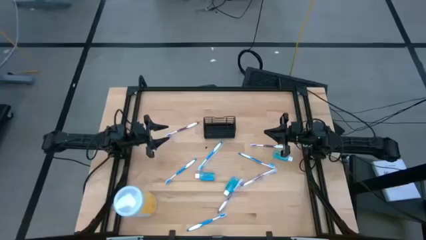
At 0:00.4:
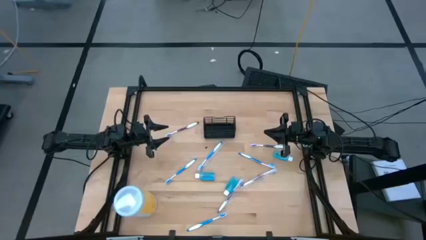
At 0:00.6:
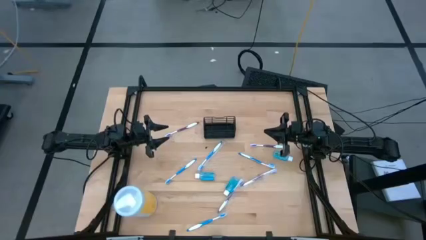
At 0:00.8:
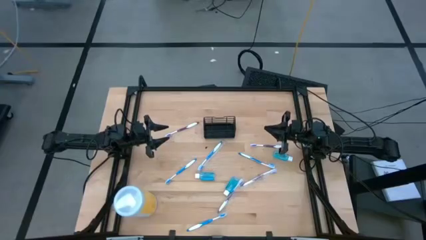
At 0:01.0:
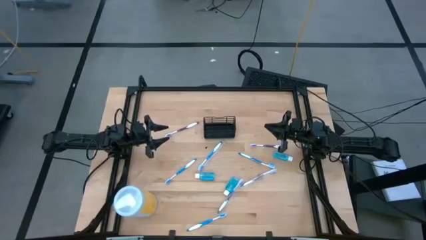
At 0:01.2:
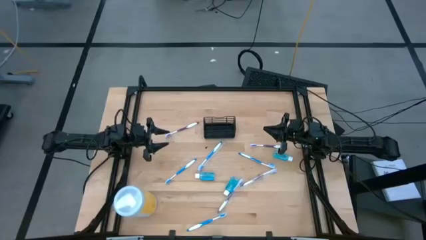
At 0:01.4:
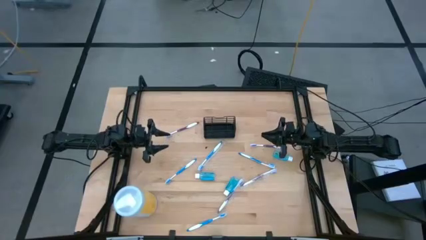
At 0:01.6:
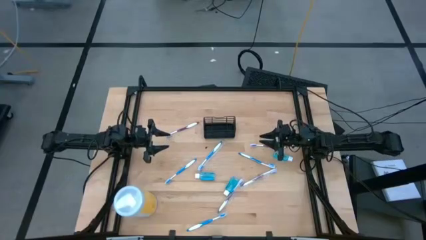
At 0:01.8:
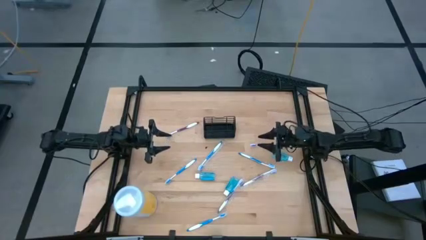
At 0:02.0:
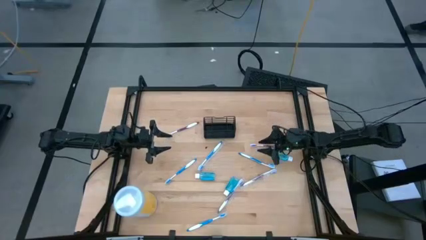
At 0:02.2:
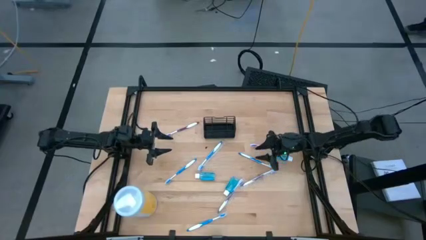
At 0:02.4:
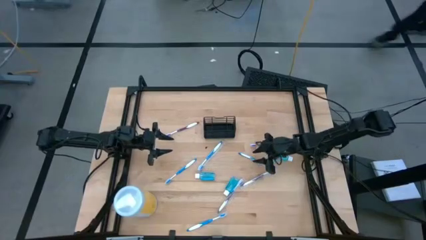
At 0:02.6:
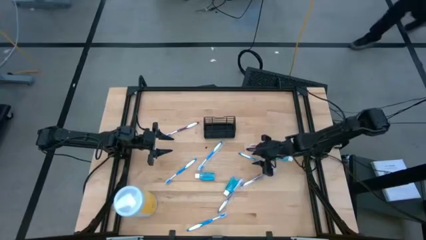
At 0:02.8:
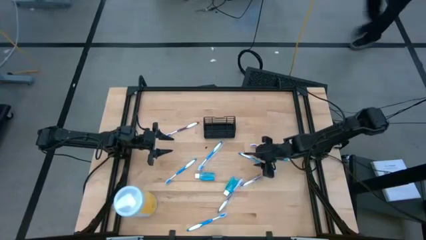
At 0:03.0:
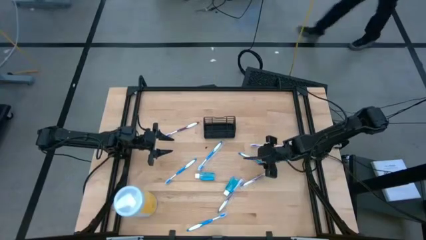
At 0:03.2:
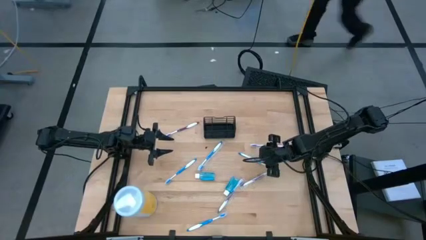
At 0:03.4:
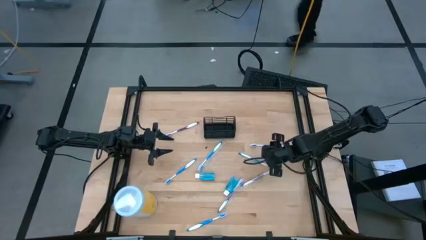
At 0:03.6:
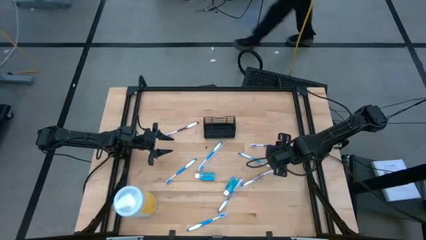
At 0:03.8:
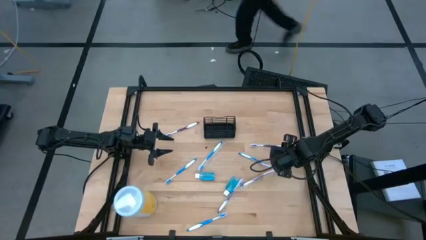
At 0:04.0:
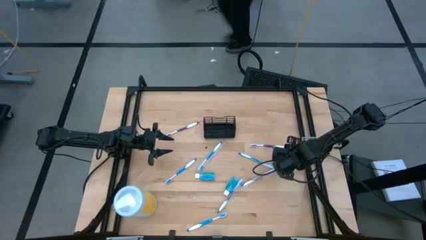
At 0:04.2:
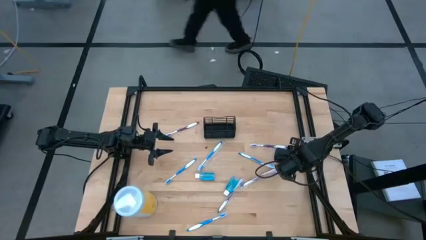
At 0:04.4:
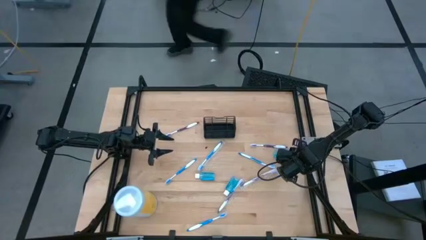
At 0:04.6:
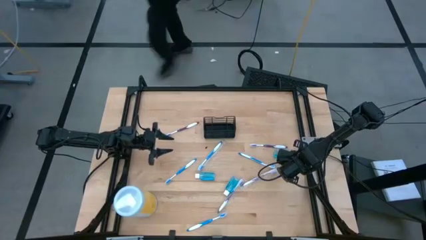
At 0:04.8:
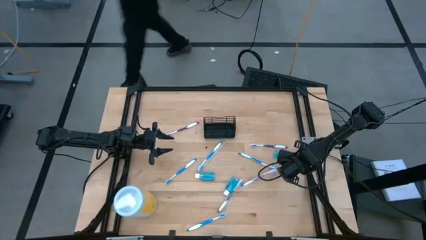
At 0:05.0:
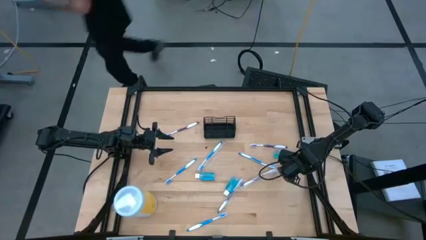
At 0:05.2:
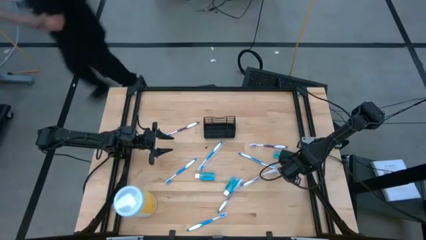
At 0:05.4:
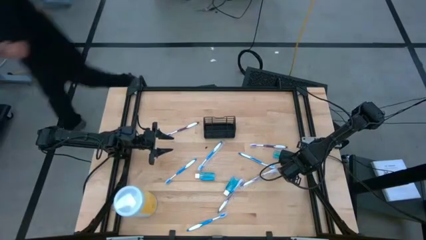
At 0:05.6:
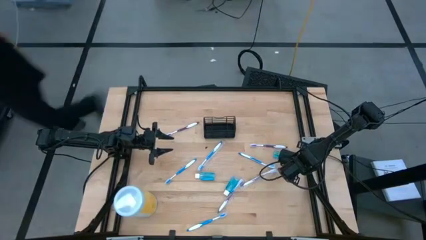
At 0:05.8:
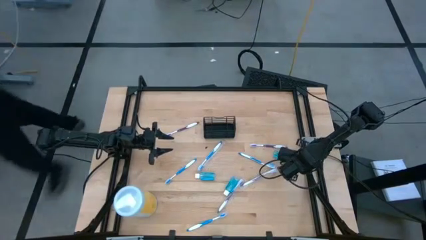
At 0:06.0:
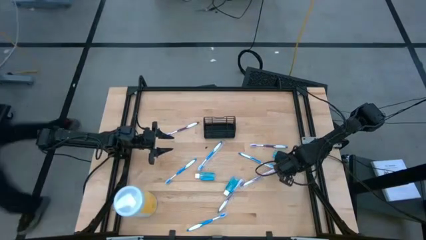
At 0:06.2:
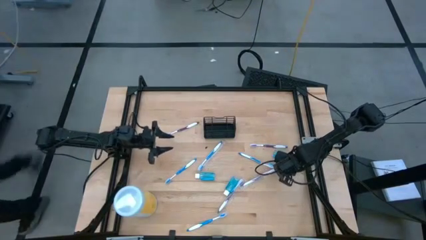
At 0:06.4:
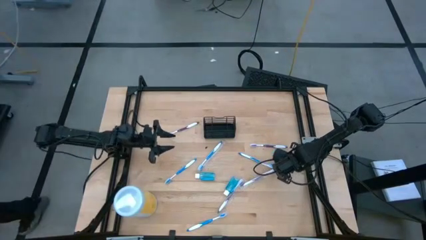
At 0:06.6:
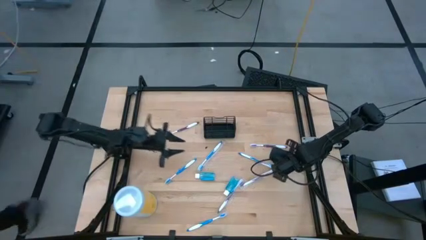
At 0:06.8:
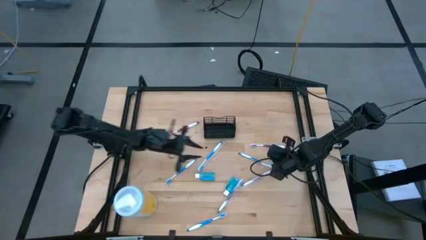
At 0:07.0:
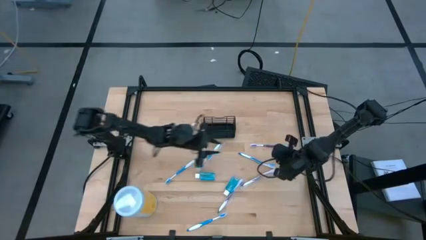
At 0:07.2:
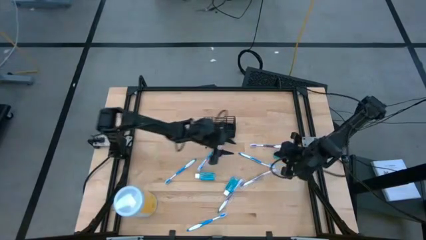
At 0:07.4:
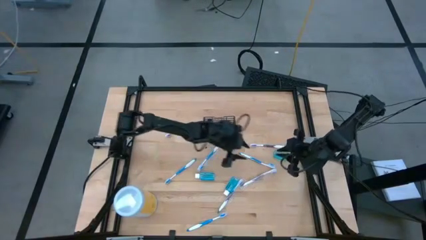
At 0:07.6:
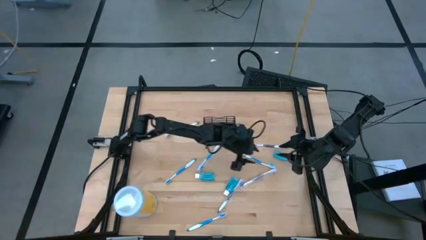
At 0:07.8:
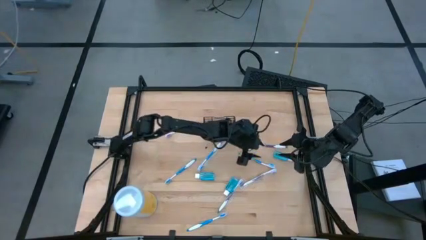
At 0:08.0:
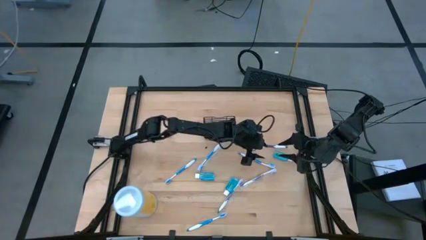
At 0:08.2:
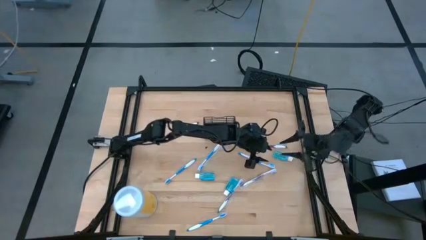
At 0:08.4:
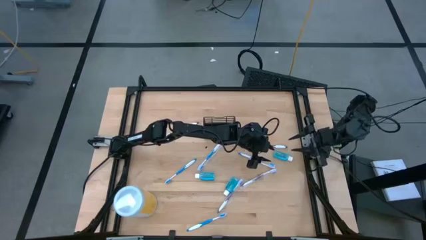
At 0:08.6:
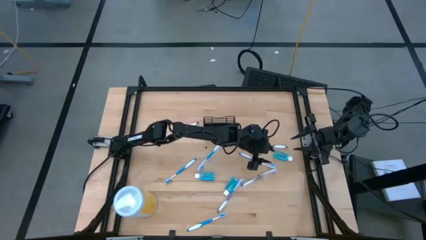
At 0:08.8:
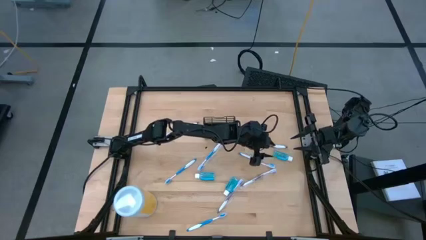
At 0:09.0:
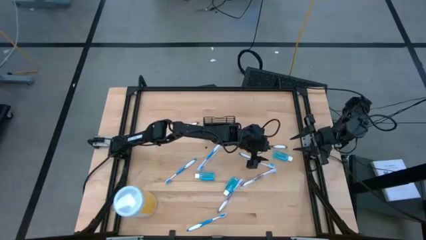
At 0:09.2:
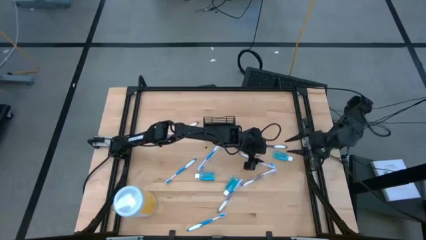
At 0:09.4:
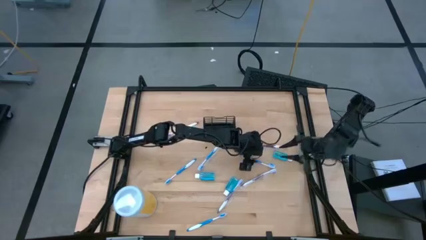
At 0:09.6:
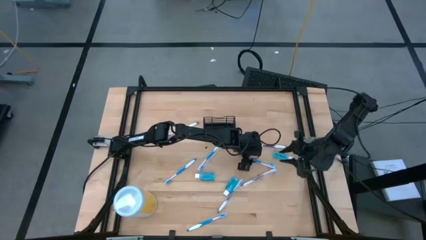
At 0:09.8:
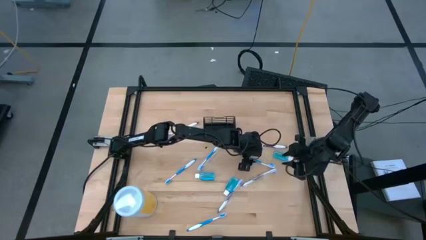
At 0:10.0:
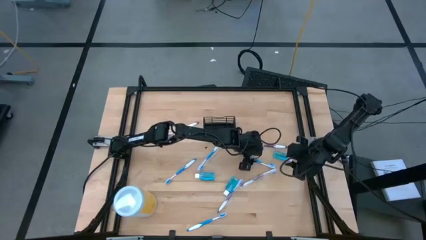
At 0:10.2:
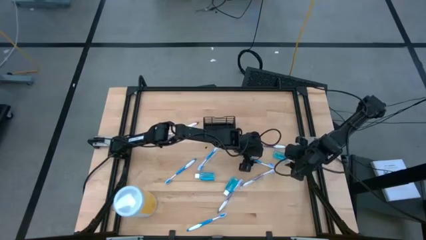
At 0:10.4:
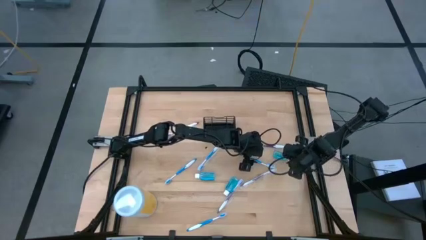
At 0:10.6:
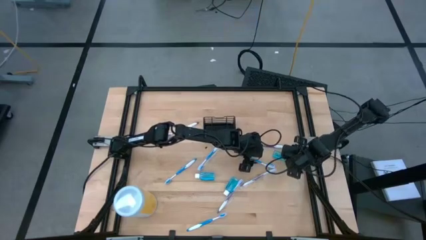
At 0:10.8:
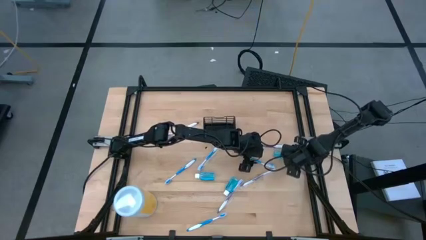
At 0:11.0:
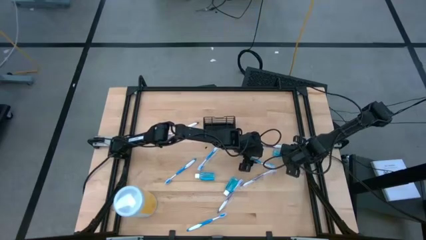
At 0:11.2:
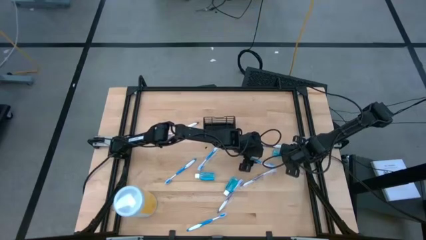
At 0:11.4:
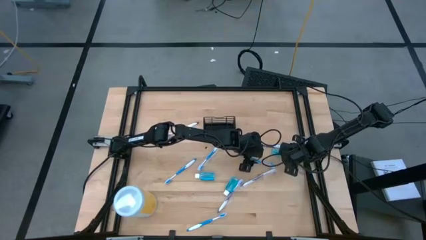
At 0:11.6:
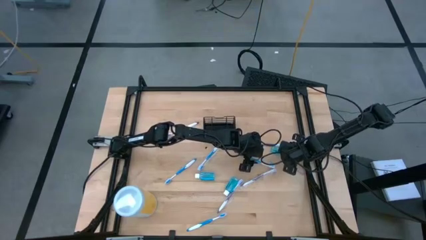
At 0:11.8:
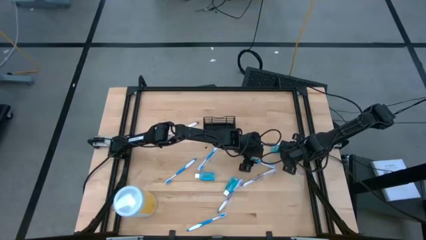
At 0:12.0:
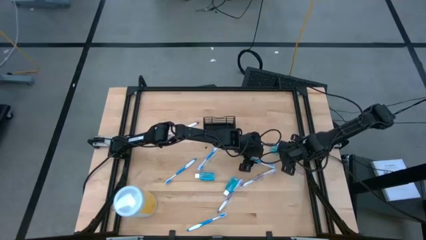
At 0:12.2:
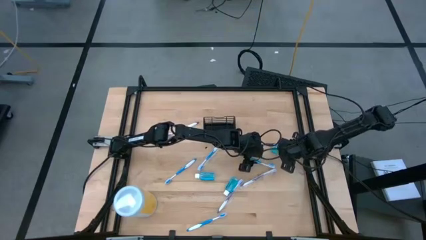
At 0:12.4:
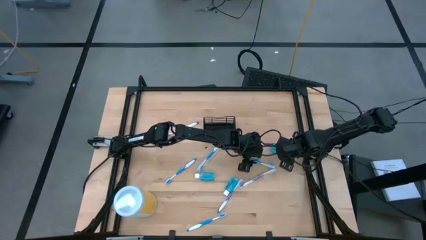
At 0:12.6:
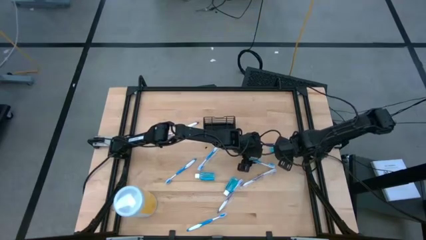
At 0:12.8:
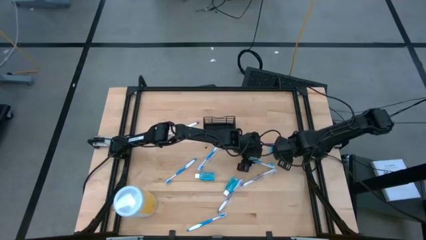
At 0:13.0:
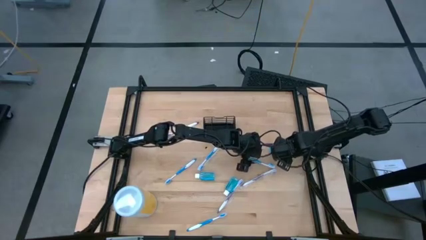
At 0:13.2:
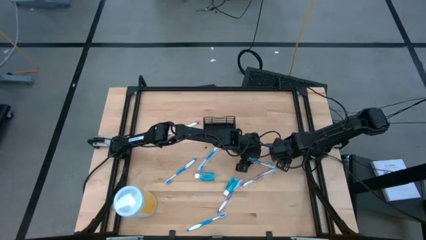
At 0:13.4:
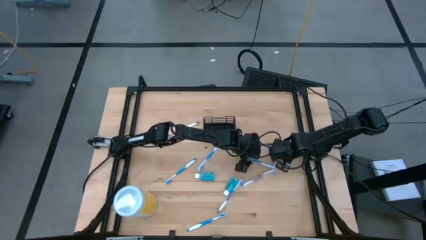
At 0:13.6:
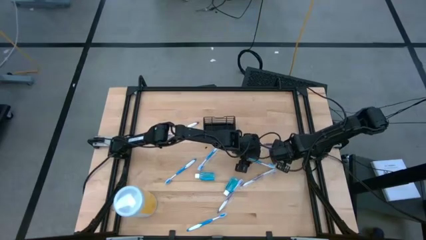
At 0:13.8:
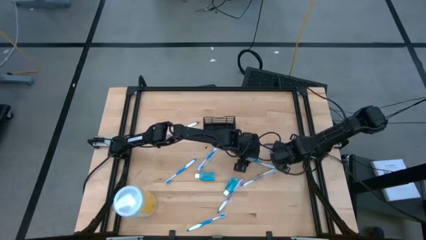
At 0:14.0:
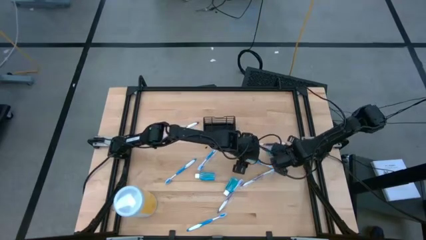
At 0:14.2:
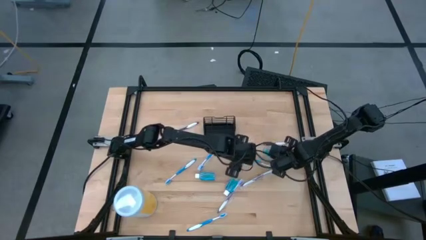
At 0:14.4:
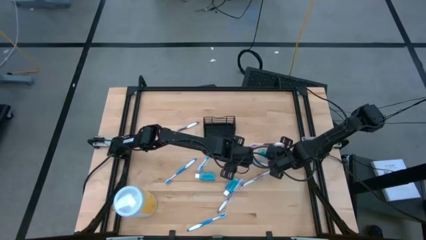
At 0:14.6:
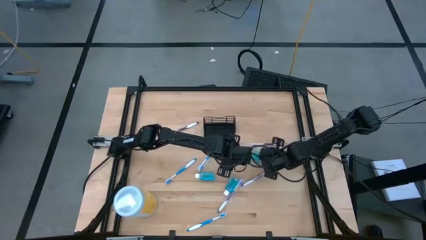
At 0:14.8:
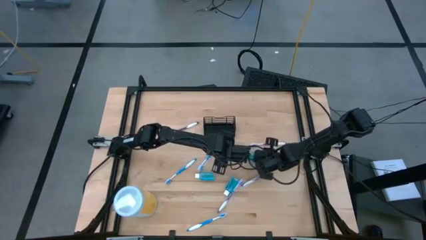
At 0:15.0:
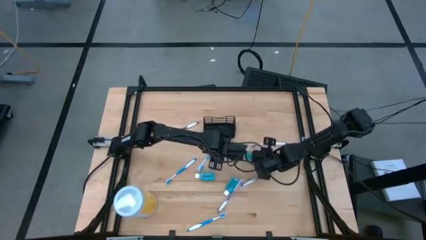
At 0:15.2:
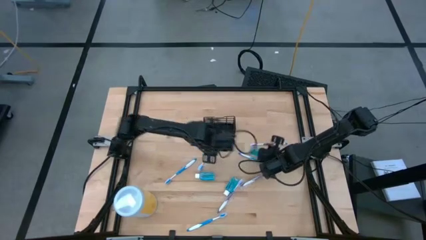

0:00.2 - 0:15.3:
Task: Pick & Place toothbrushing station
Put the blue mouthwash bottle into the black organizer
